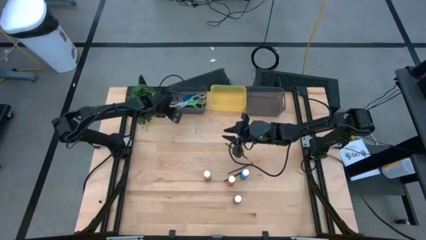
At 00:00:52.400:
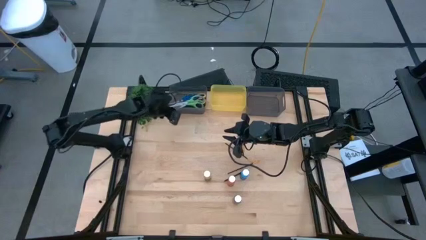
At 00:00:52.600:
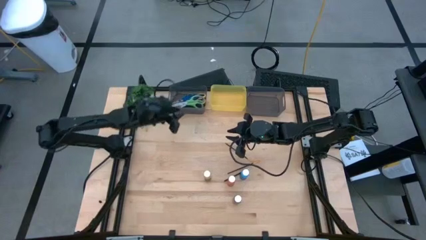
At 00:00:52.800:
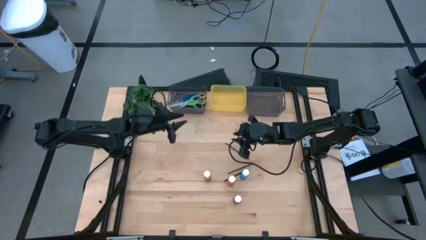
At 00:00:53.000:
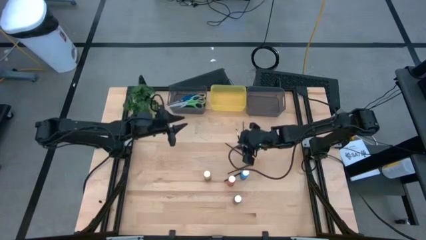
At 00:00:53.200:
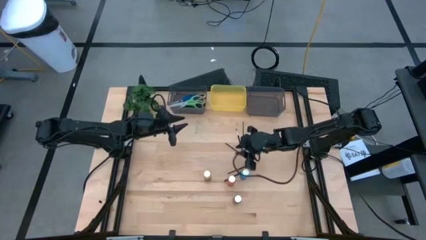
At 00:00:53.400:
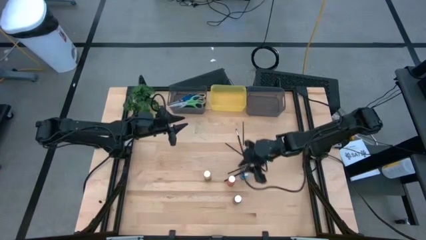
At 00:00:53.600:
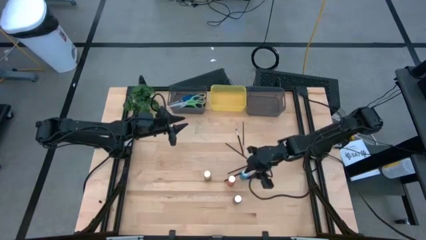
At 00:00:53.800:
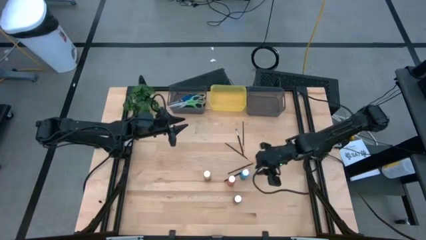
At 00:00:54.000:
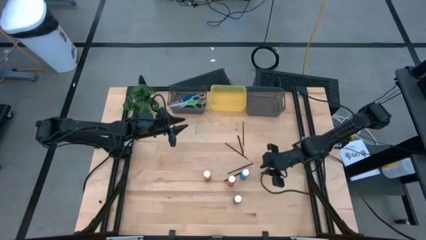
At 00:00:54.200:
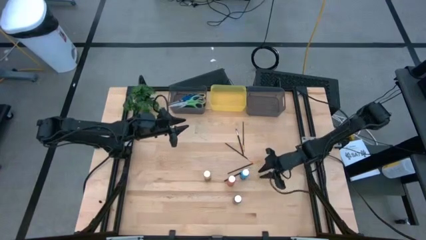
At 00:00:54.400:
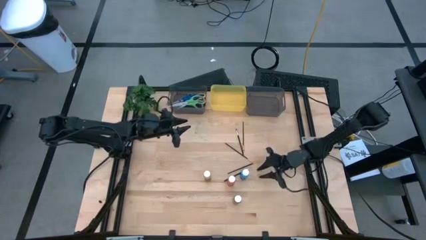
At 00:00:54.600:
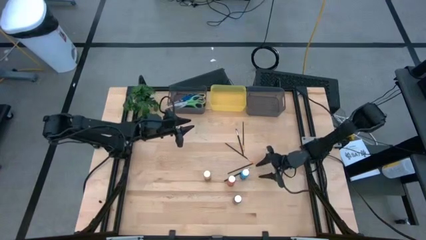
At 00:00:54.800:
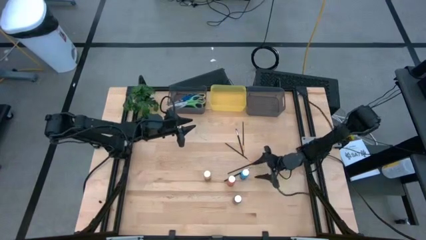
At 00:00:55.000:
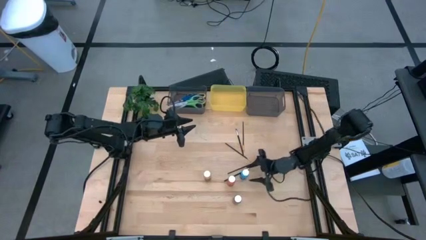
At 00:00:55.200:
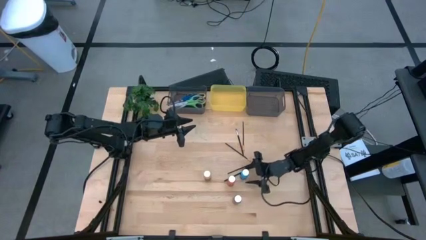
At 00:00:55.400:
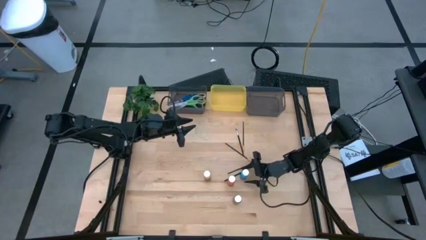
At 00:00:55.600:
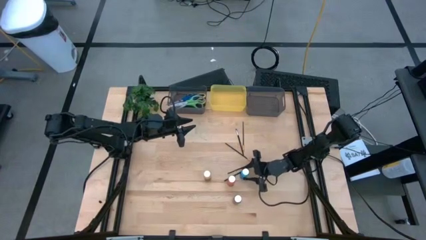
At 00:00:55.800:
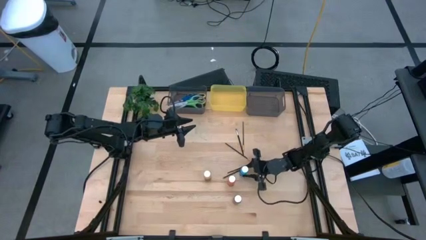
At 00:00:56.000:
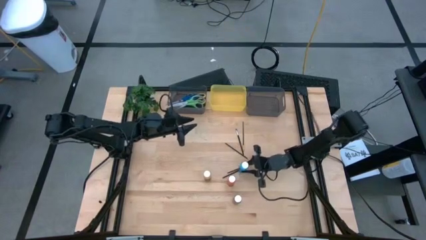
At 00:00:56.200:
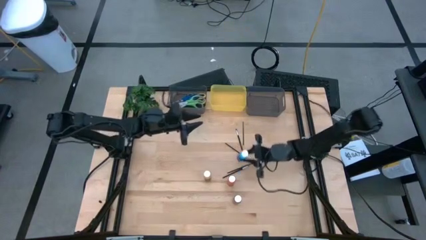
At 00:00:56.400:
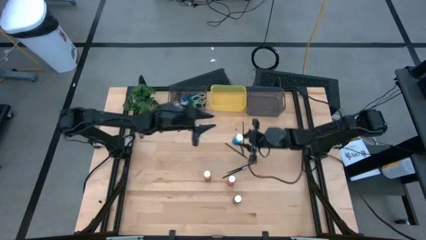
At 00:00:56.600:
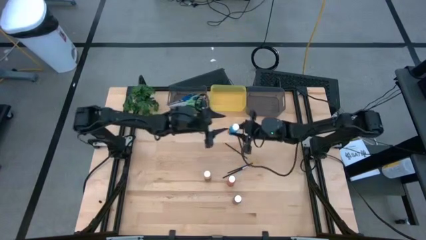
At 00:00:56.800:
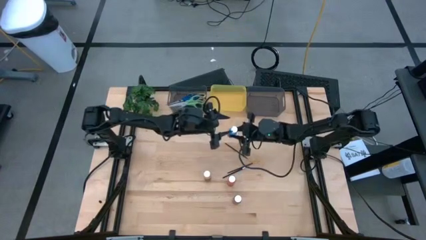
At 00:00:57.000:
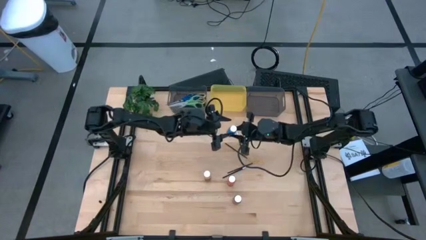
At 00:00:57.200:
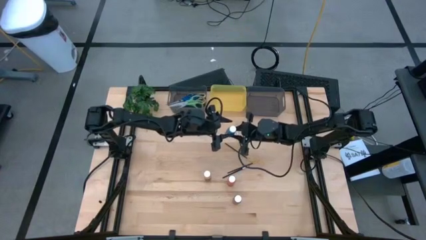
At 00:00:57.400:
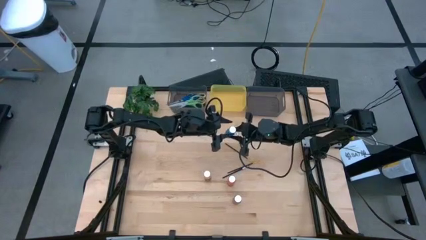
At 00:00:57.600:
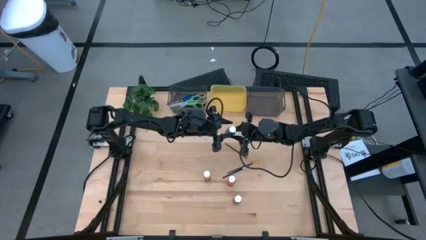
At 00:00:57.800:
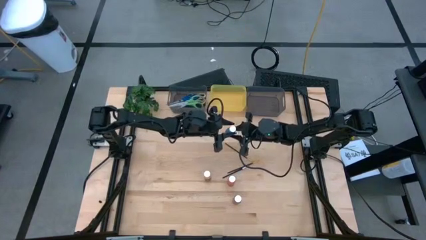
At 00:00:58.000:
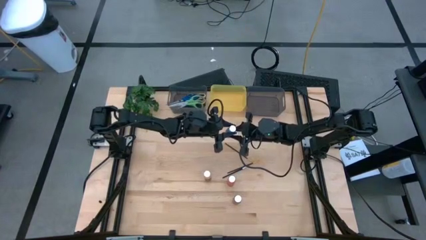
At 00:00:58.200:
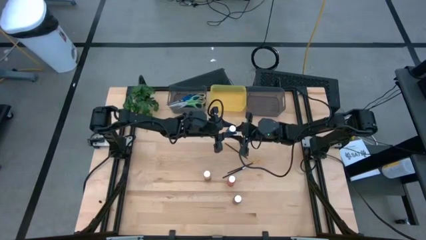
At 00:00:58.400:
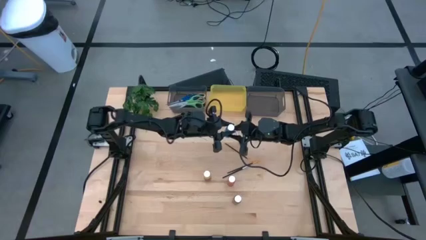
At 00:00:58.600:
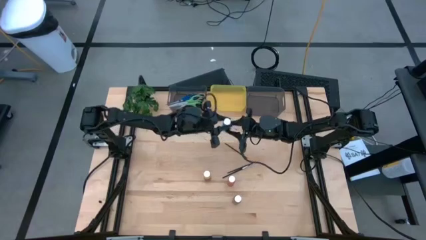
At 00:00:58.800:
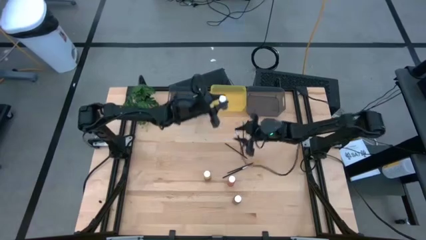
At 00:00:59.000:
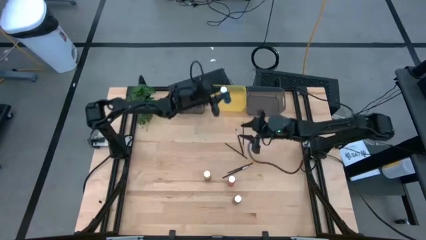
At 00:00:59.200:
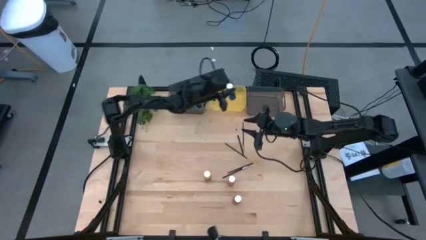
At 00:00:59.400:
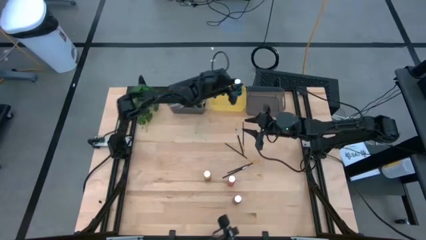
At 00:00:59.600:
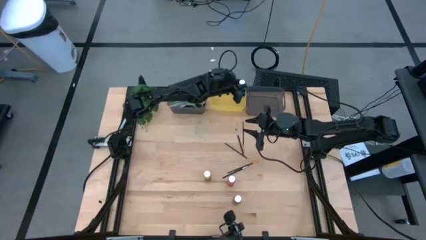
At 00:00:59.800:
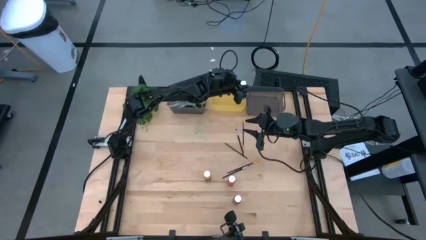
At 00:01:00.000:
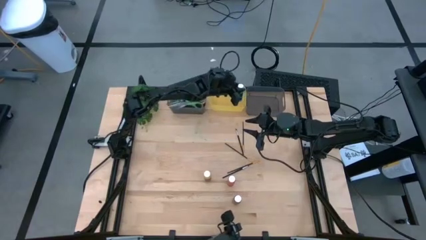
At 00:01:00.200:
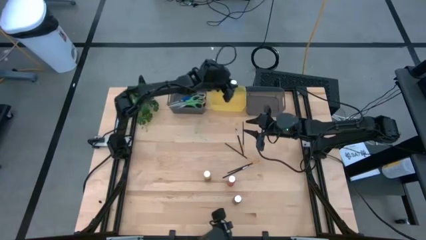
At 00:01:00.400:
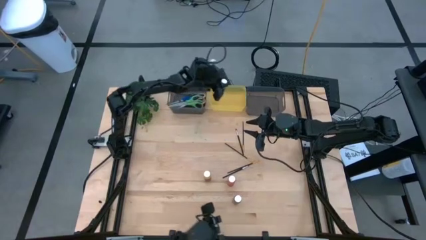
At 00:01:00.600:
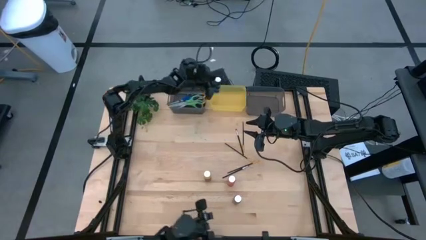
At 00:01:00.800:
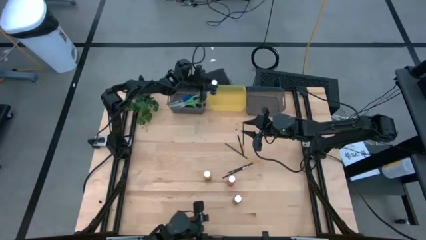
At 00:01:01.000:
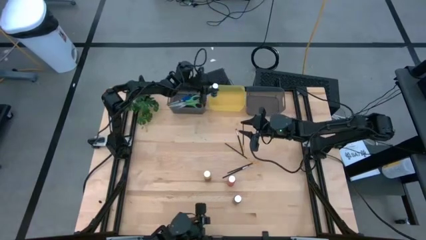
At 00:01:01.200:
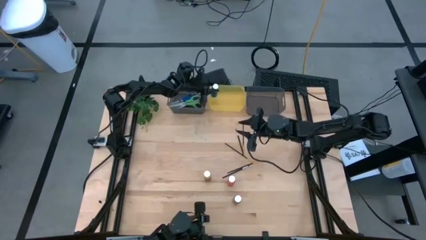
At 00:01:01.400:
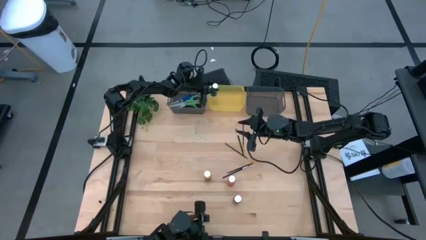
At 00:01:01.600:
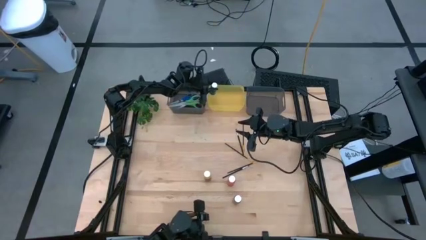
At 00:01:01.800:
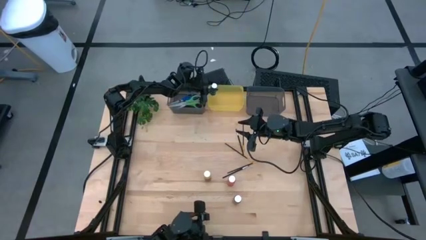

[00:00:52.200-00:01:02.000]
Task: Pick & Place Paint Supplies
Put the blue paint bottle into the yellow bin

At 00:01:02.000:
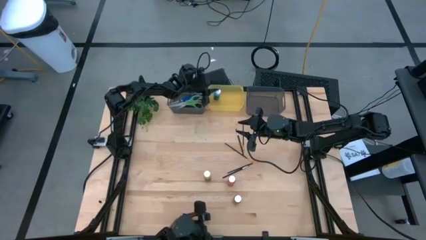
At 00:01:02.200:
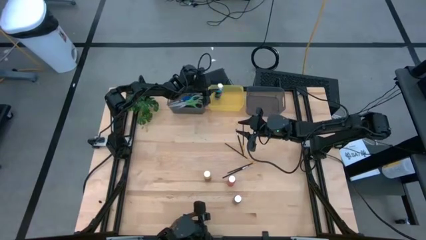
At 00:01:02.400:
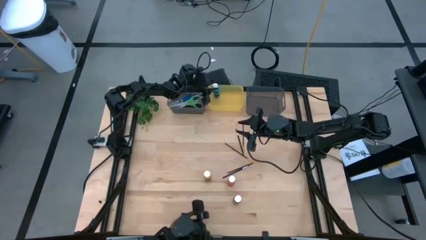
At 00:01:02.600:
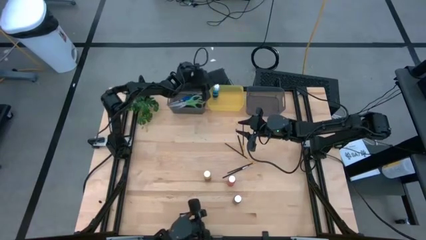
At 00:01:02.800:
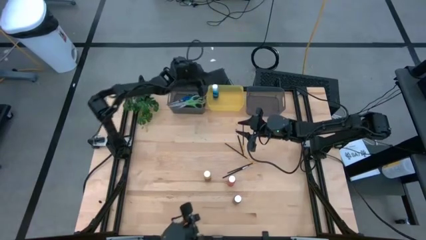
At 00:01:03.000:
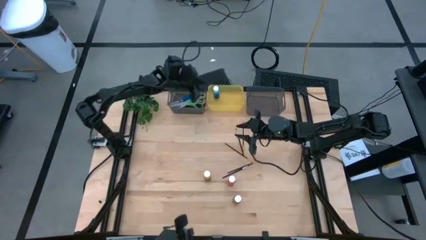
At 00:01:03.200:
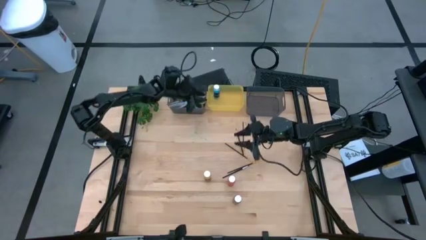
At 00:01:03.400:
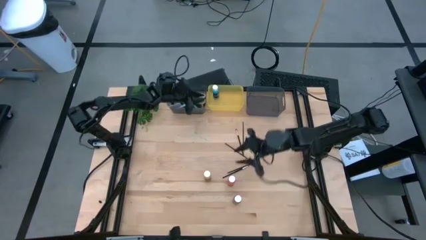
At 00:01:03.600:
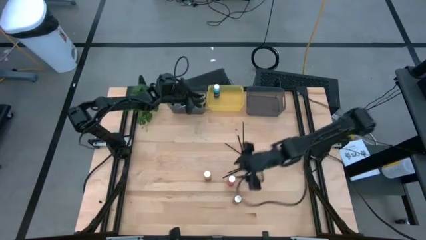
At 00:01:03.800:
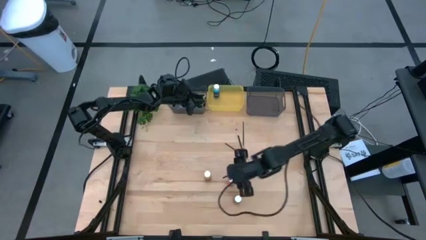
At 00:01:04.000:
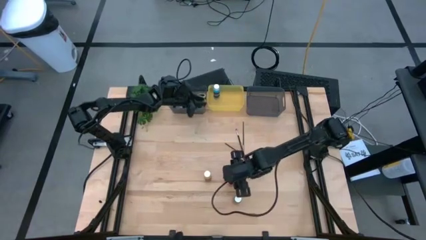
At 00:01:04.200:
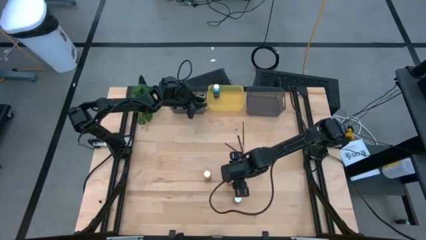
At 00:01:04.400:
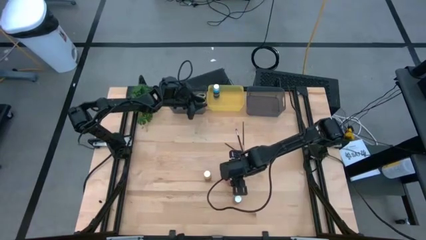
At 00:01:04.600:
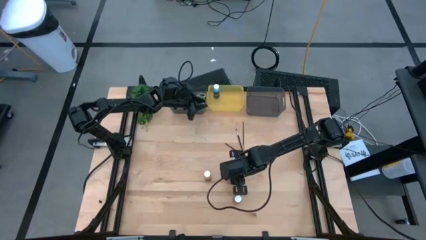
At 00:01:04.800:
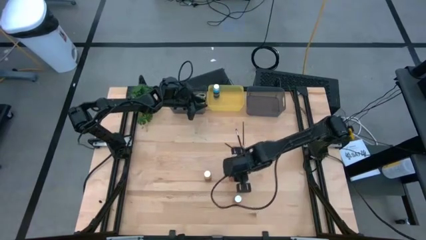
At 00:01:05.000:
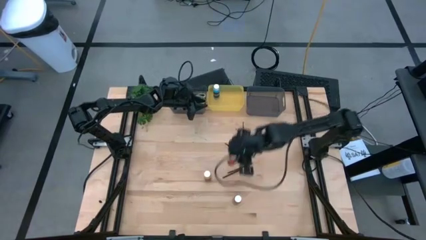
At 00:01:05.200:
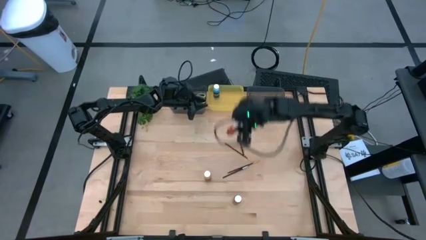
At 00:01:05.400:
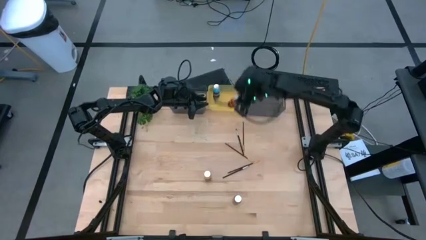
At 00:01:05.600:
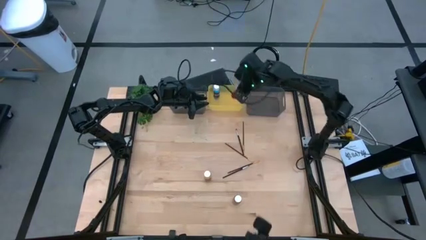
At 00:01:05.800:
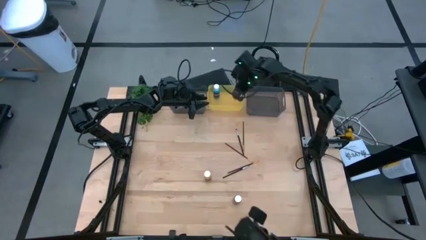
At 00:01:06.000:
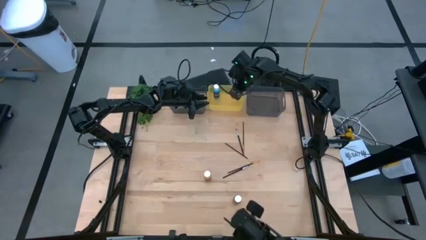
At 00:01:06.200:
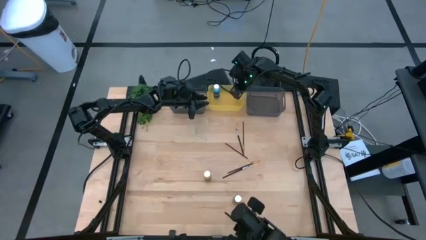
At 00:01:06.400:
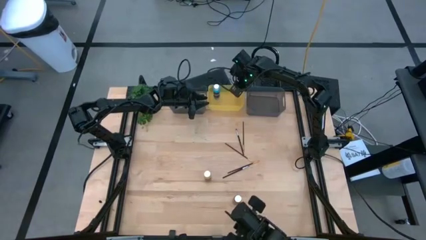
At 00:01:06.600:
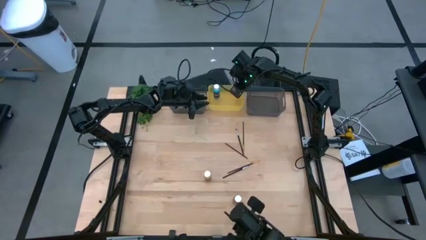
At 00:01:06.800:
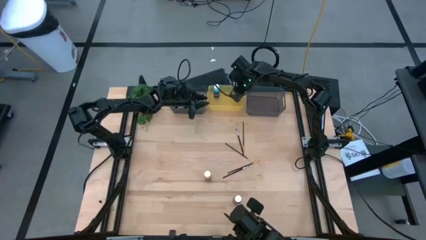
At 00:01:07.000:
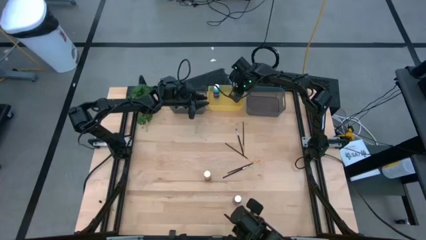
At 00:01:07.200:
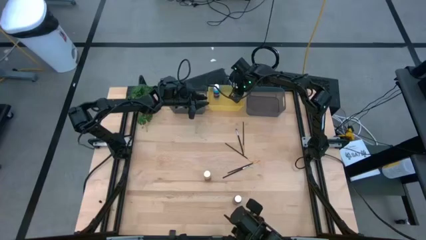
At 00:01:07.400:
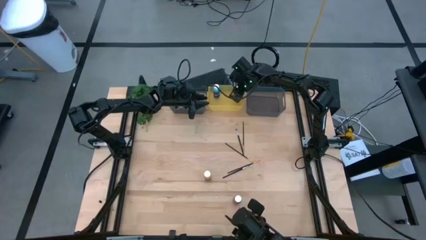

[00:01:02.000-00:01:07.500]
Put the orange paint bottle into the yellow bin
